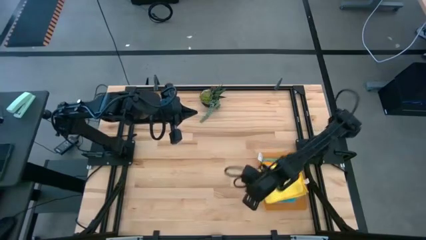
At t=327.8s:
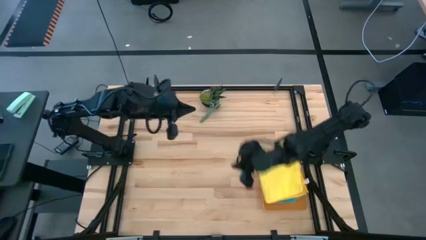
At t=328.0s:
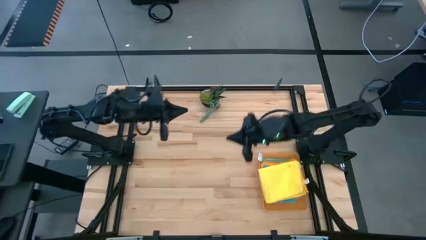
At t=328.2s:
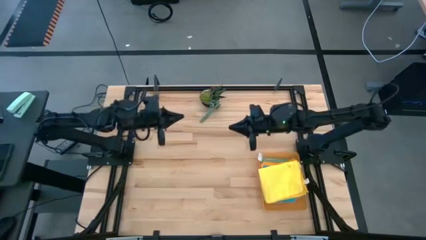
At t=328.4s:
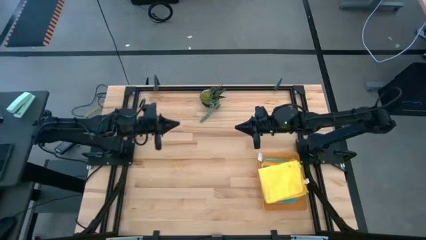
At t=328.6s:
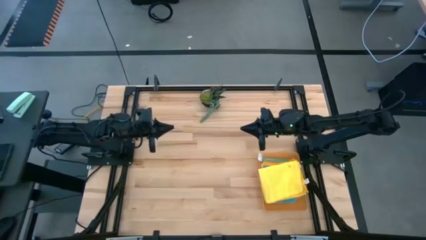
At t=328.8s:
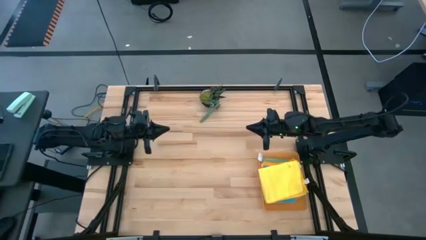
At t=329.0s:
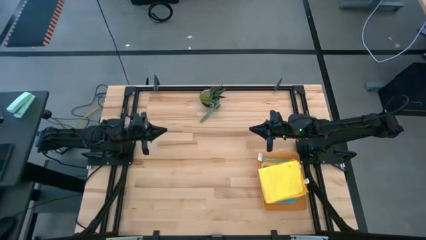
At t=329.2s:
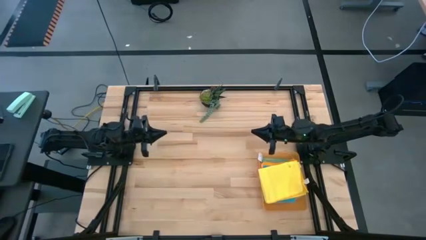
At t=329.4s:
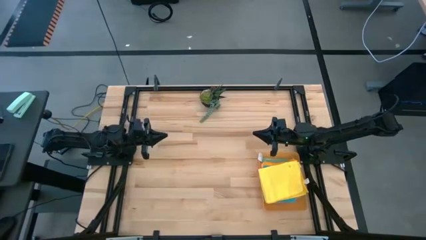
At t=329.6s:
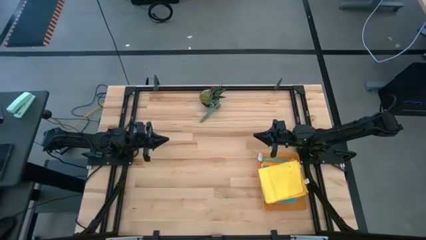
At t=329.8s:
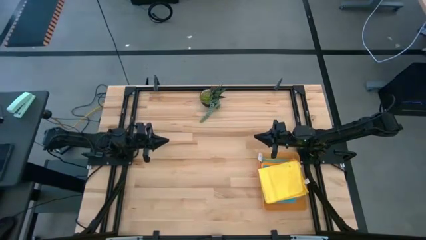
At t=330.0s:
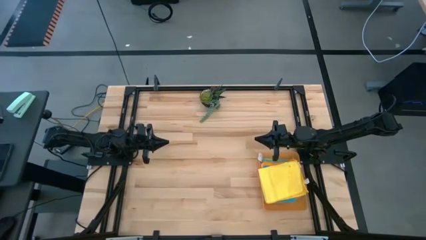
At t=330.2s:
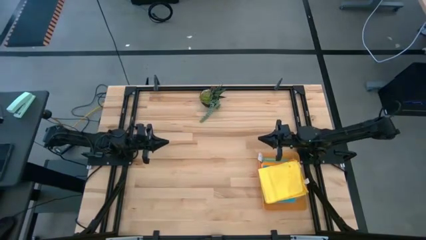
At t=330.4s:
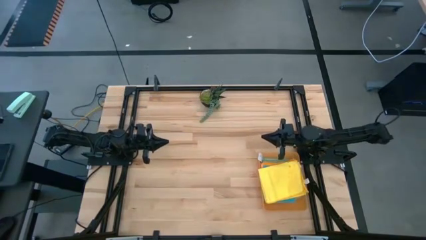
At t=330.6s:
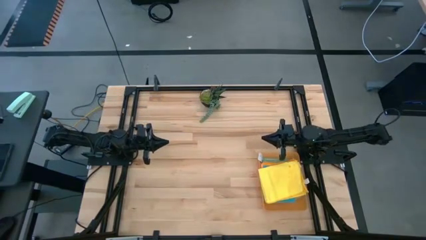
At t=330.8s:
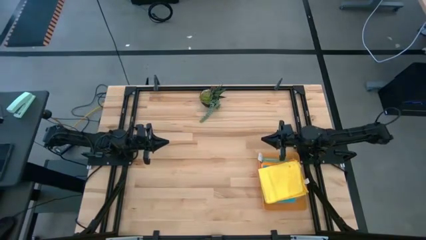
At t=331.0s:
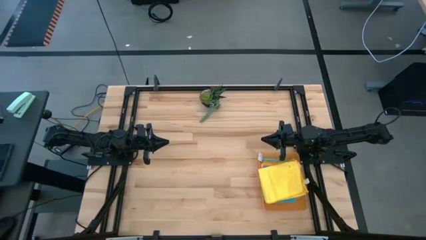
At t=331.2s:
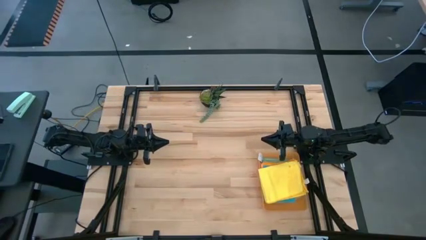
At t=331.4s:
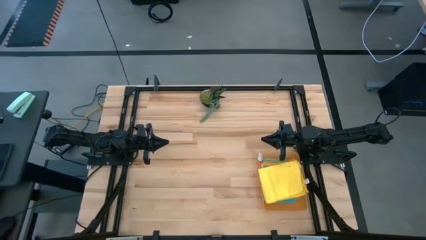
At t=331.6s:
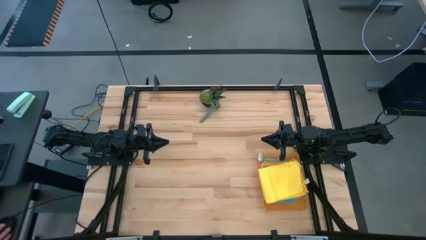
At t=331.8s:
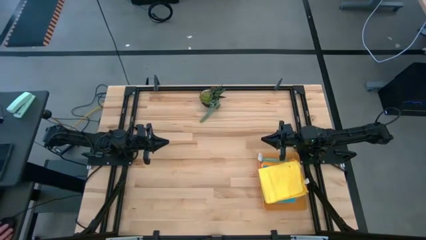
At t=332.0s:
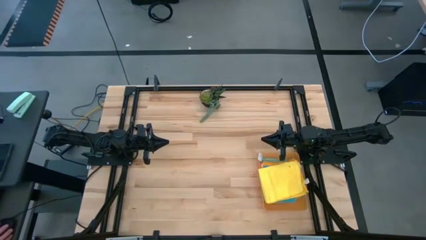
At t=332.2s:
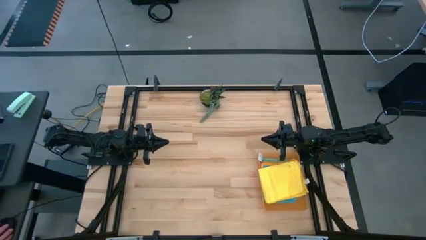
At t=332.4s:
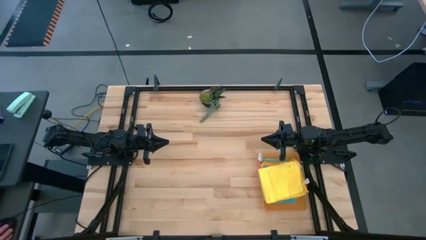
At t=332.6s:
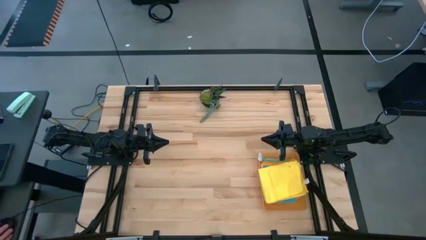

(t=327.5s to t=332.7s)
Task: Fold microfiber towels
Return to Home Position

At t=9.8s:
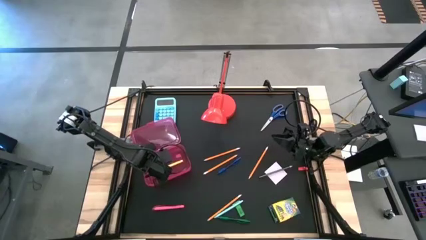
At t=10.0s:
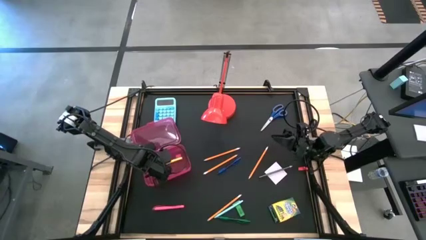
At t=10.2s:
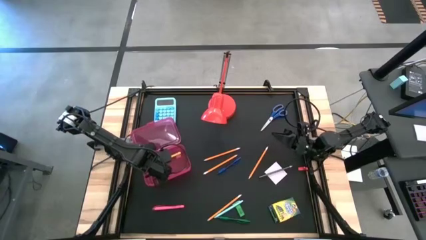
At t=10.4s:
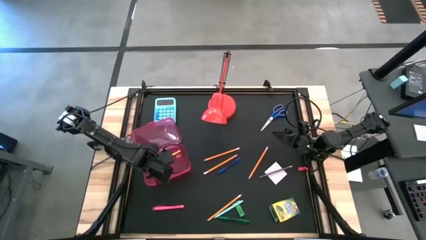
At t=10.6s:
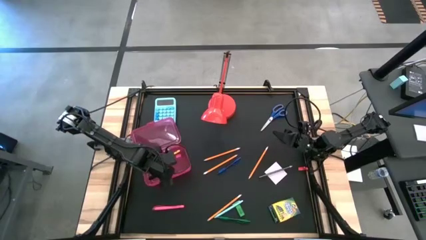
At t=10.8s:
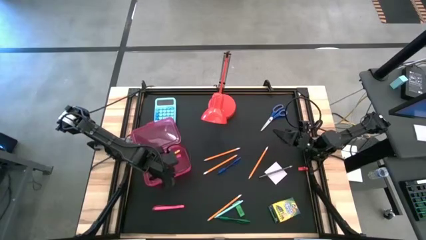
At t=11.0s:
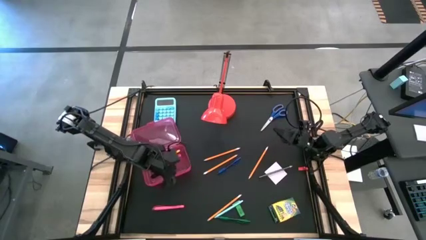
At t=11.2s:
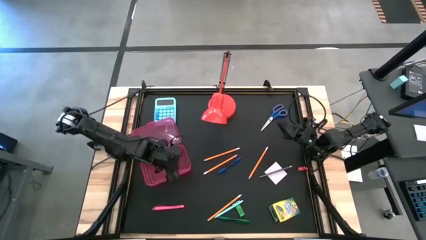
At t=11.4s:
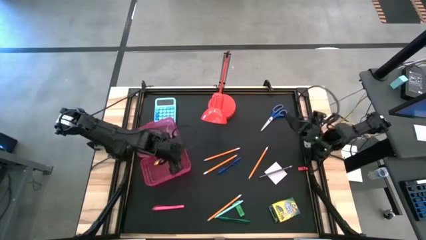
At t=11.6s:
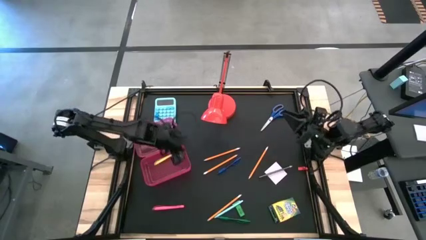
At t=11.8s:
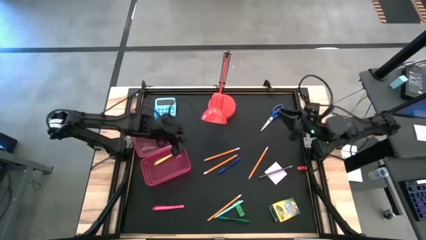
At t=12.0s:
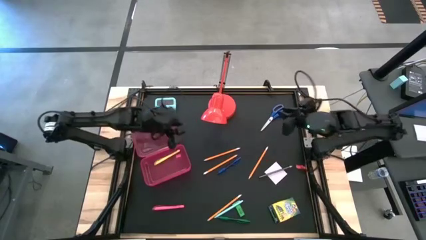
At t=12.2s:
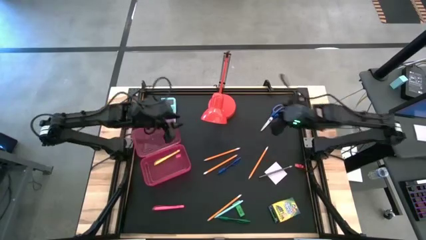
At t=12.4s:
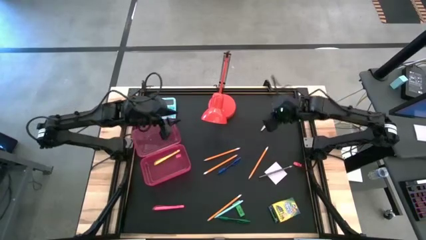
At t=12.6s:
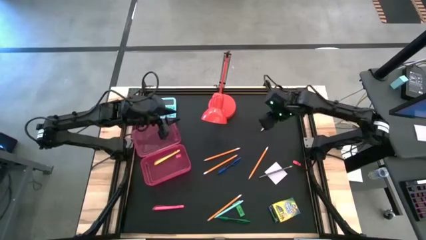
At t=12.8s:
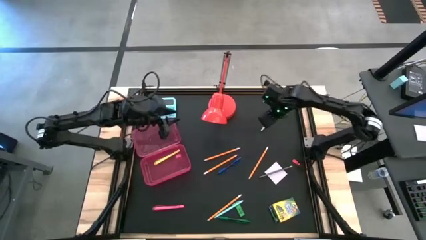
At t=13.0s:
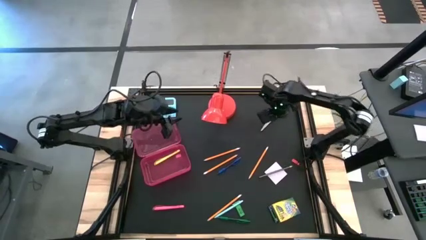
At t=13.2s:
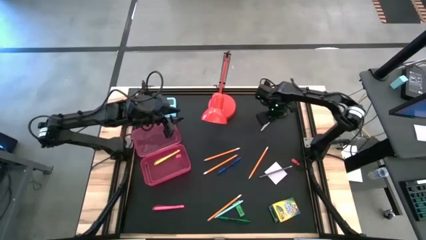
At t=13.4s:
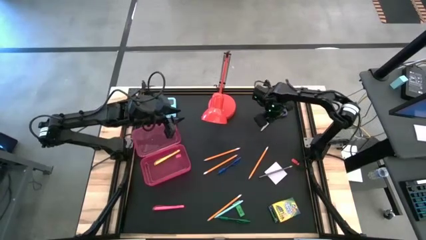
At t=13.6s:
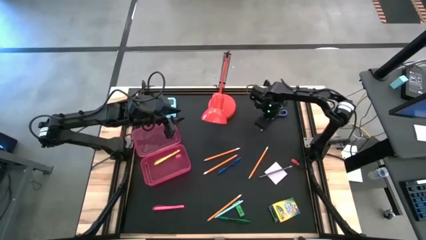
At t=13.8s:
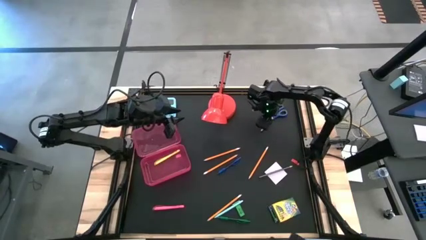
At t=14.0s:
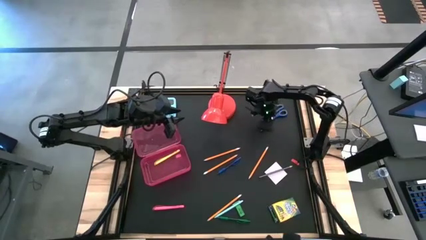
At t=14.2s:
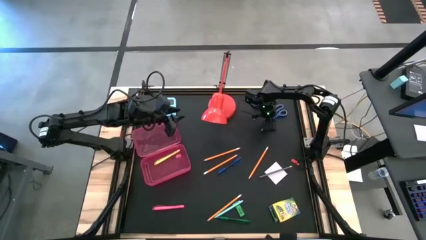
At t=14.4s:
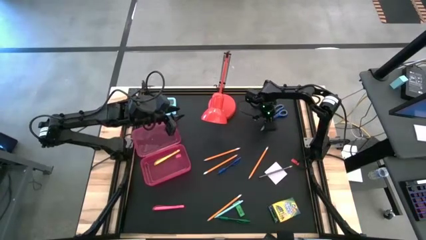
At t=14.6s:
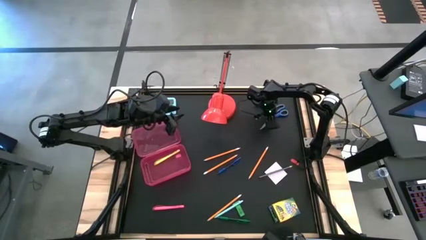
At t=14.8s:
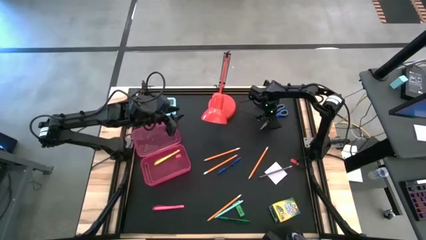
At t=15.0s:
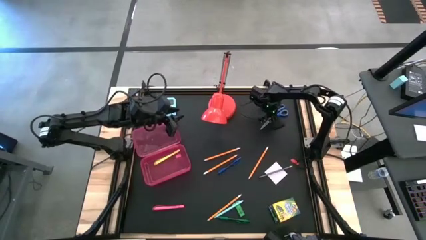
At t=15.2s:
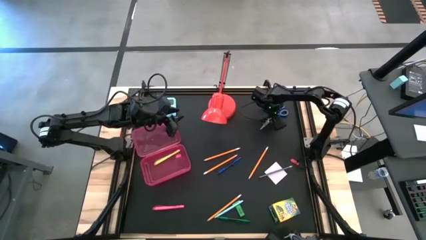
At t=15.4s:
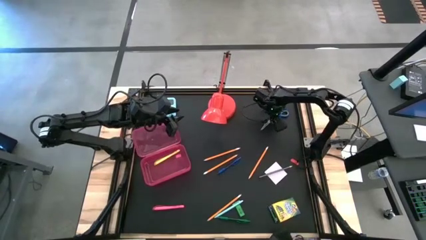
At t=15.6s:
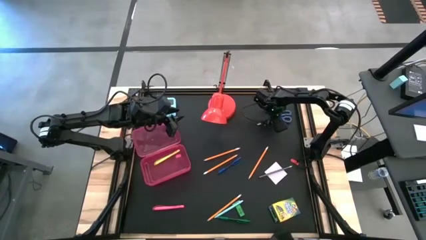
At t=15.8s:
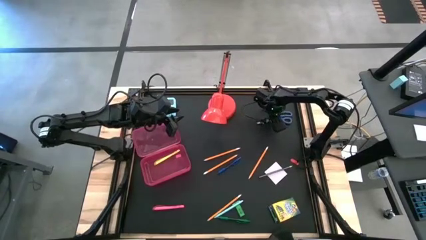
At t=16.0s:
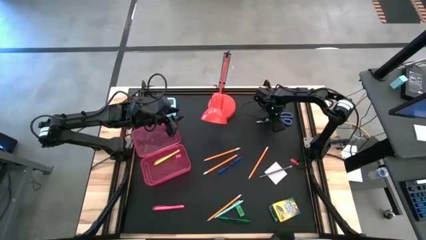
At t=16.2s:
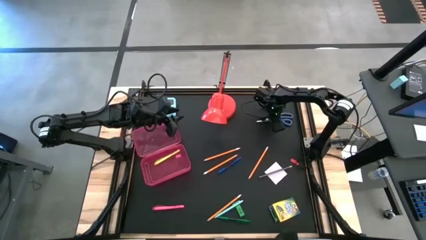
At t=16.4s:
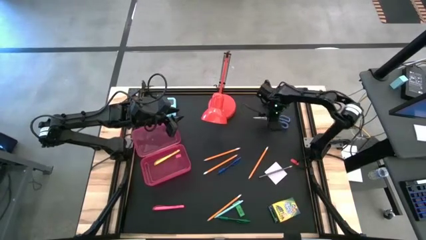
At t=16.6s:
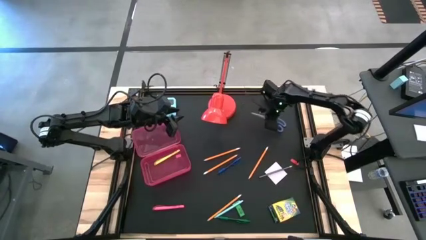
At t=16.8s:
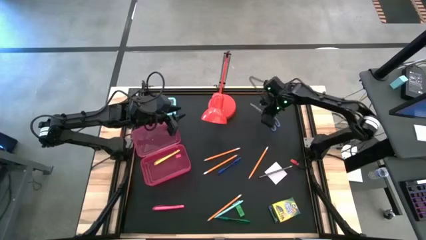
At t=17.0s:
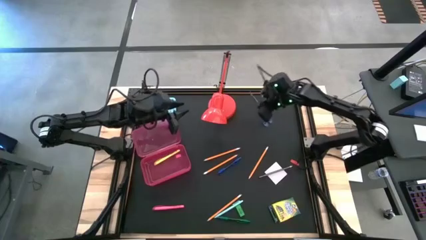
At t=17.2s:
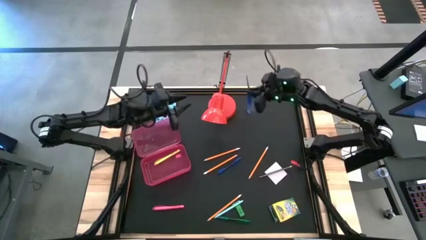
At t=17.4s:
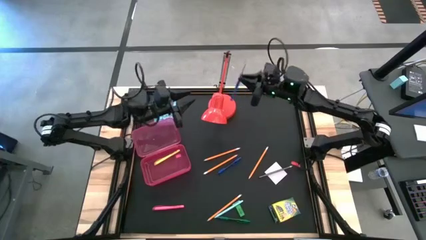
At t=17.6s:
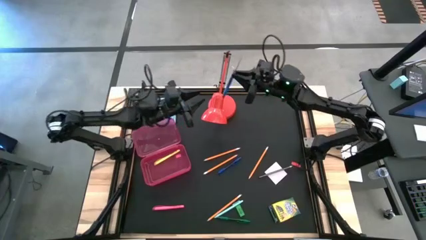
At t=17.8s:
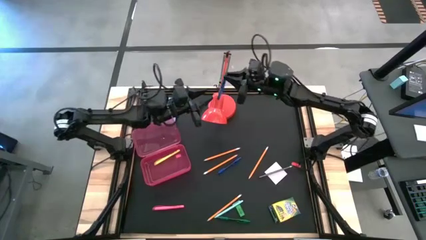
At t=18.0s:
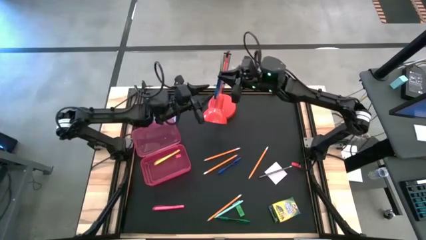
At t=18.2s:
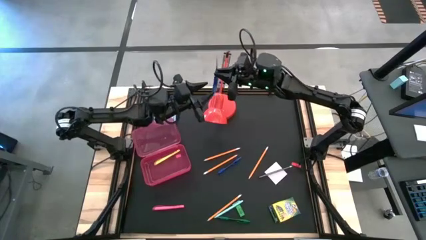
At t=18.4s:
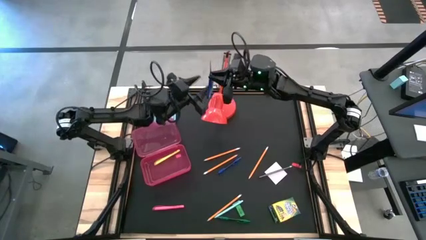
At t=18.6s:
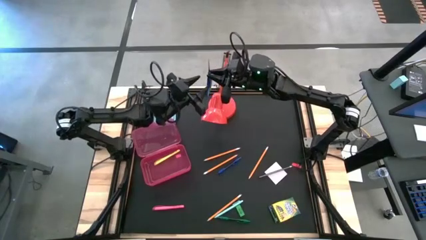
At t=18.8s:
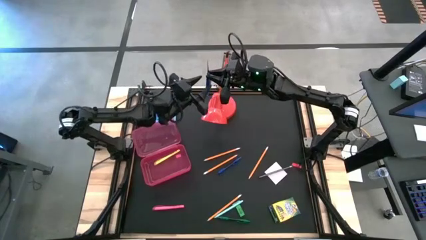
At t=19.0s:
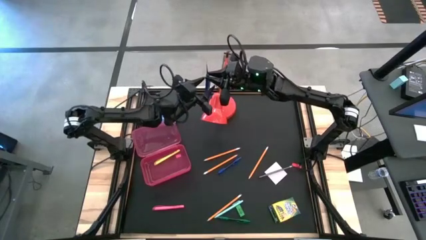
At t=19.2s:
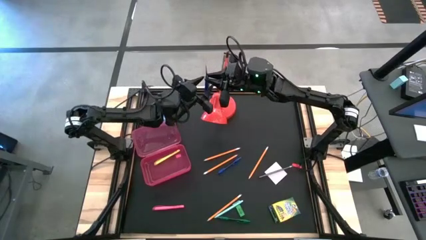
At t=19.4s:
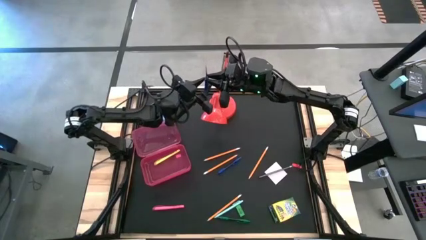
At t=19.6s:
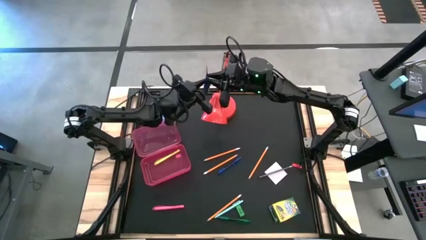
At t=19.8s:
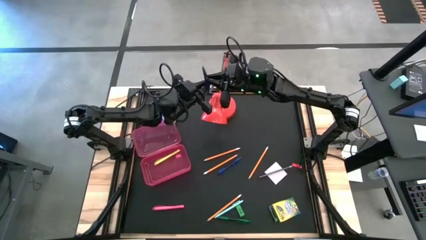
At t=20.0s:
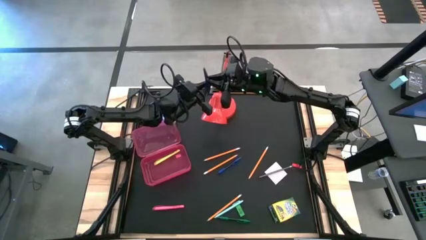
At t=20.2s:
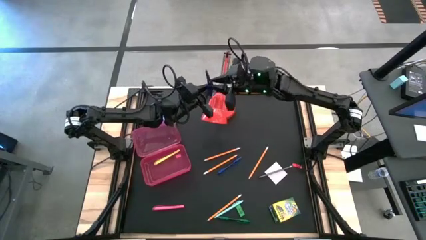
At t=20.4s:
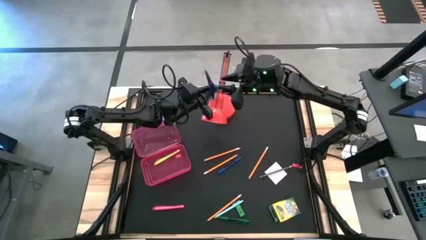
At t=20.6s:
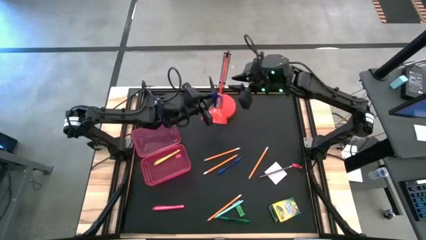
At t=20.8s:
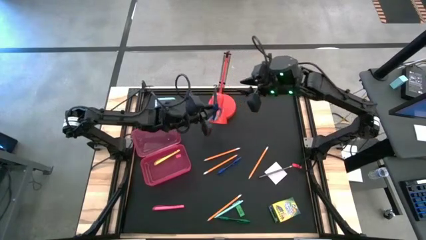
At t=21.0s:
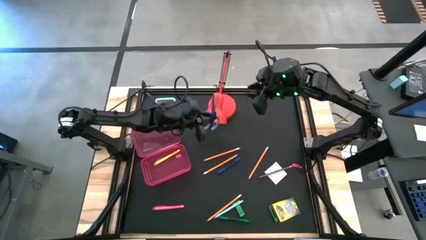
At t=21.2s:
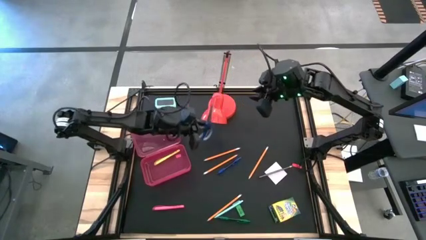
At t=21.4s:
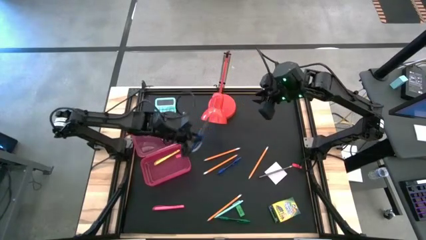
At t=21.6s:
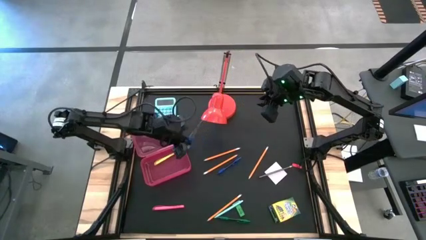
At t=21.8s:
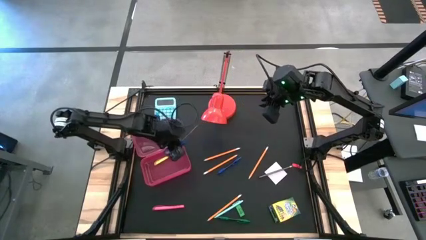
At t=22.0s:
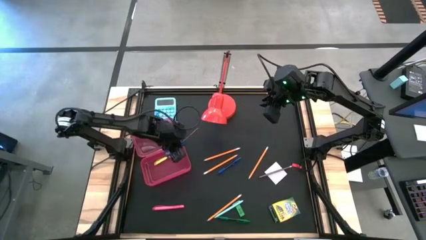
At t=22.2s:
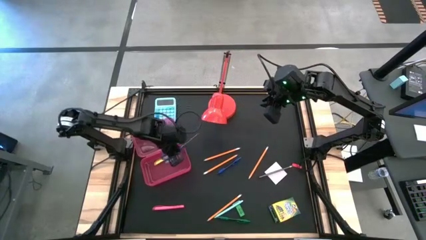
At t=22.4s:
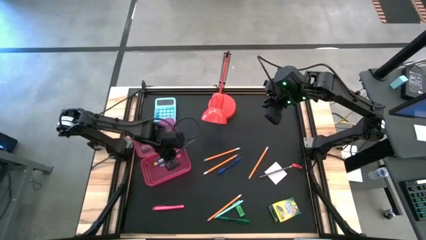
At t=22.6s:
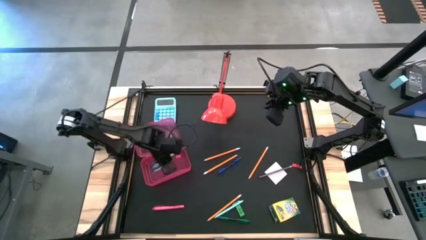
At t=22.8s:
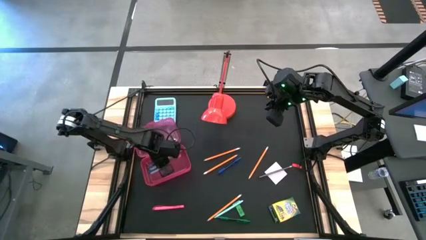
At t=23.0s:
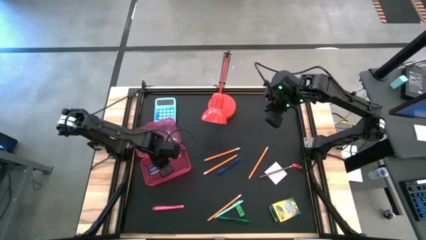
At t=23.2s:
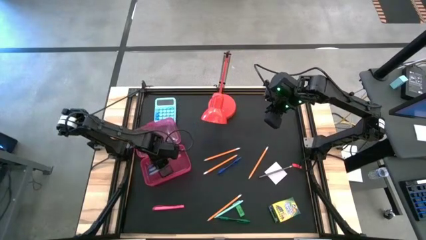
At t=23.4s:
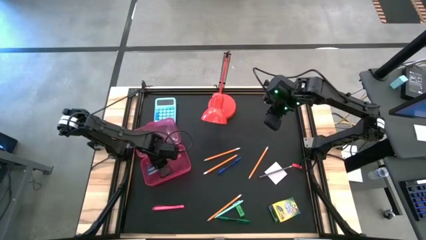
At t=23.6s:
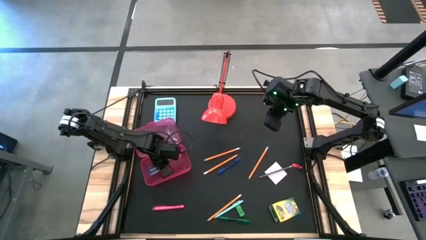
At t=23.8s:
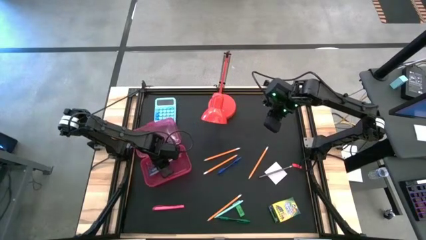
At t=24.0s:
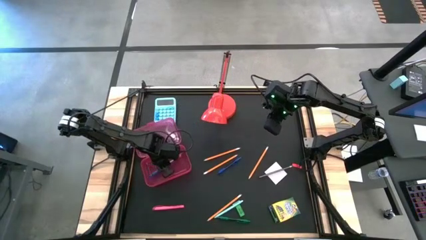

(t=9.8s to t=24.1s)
Task: Pack school essentials
Put the blue scissors into the red supply box
